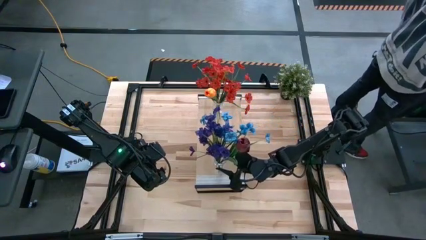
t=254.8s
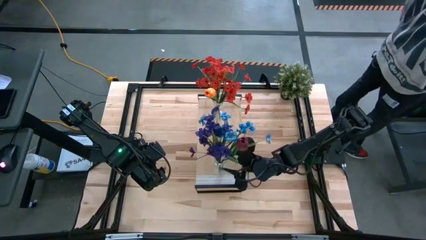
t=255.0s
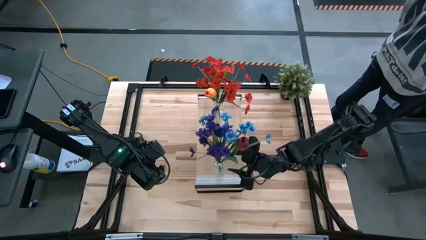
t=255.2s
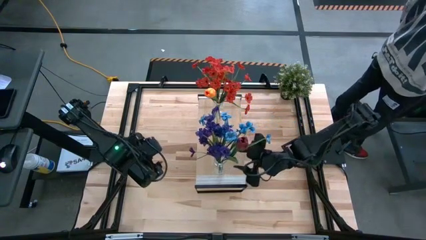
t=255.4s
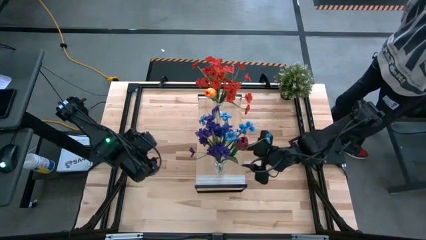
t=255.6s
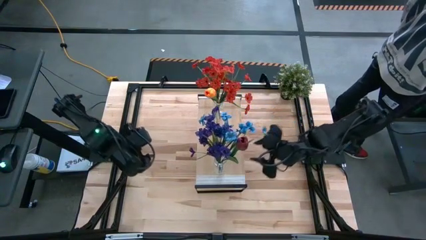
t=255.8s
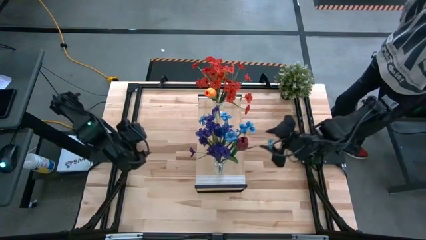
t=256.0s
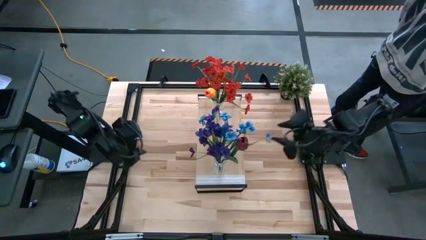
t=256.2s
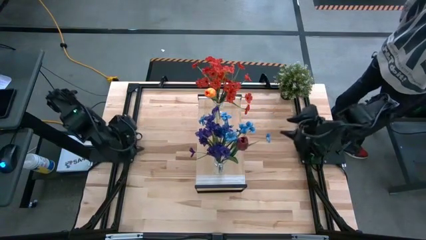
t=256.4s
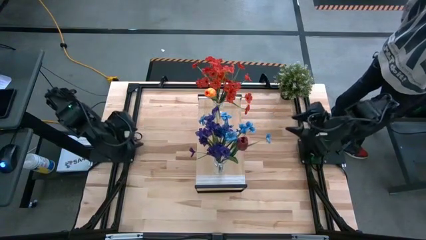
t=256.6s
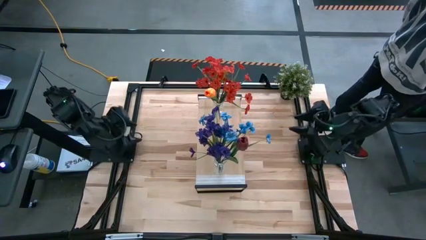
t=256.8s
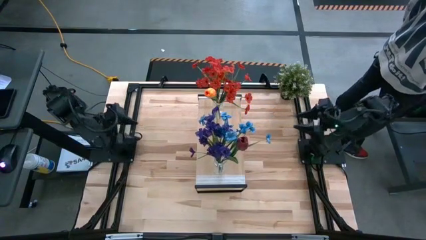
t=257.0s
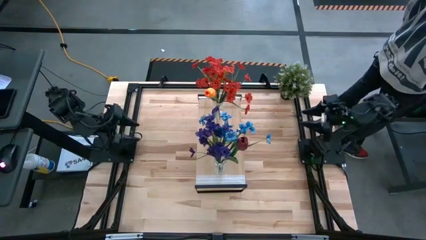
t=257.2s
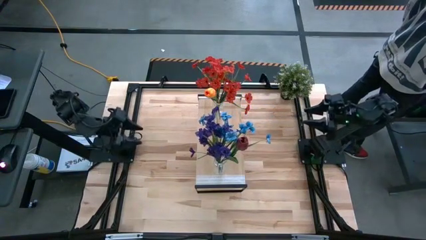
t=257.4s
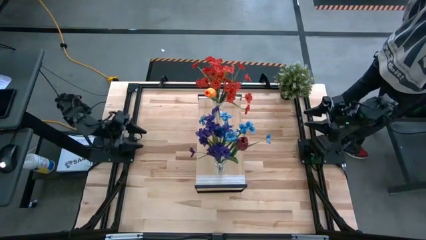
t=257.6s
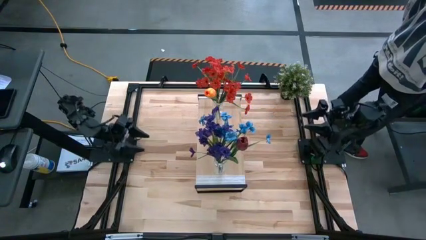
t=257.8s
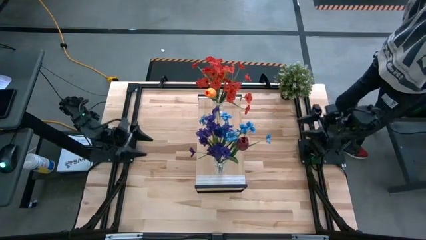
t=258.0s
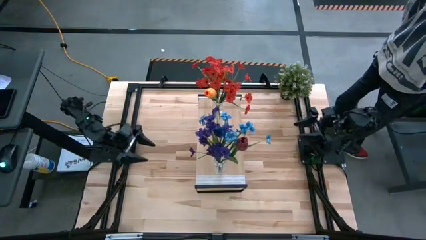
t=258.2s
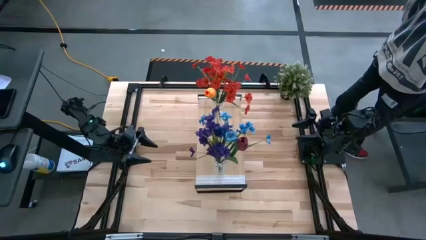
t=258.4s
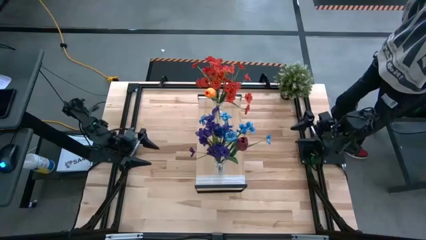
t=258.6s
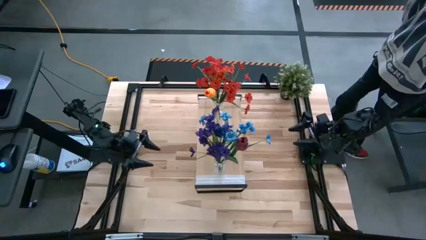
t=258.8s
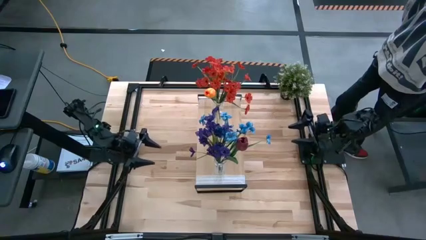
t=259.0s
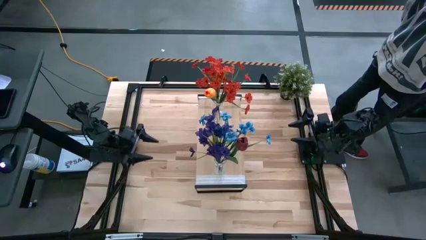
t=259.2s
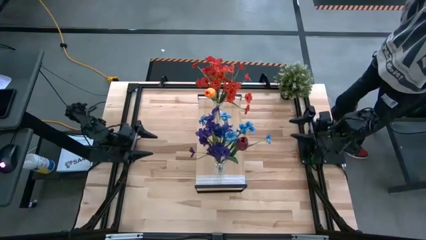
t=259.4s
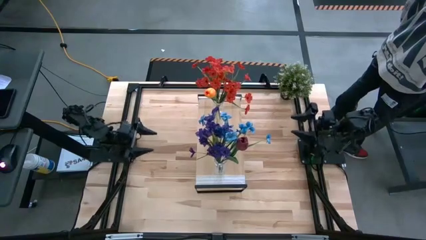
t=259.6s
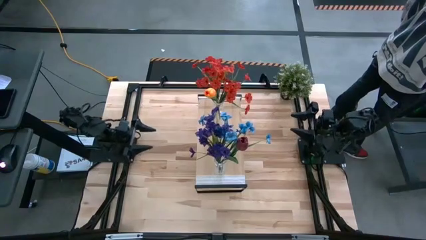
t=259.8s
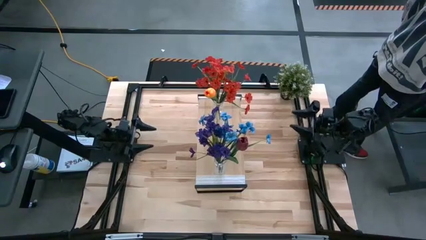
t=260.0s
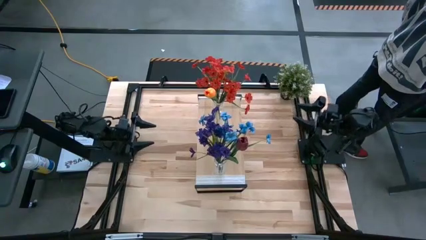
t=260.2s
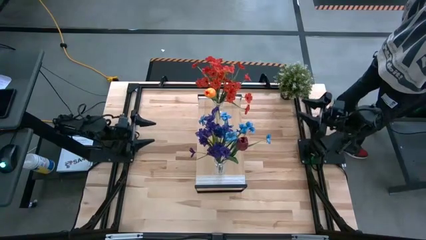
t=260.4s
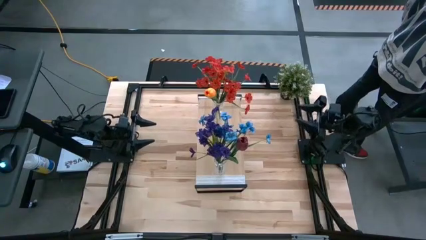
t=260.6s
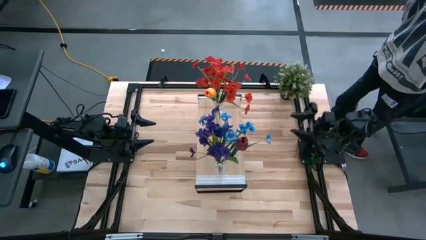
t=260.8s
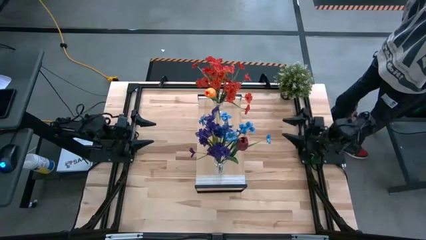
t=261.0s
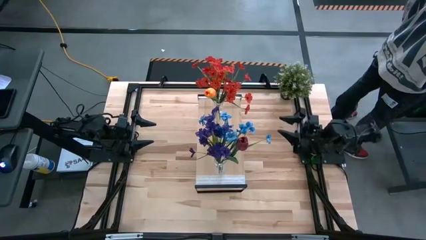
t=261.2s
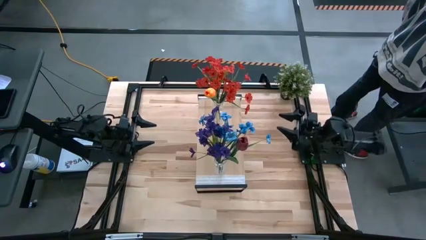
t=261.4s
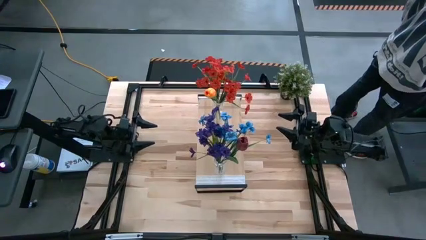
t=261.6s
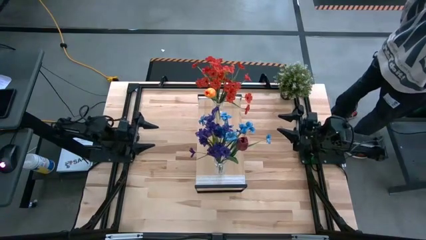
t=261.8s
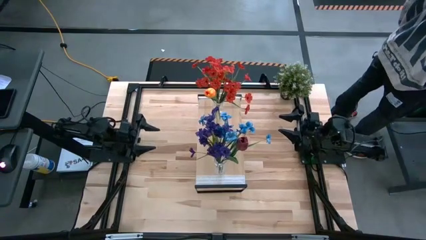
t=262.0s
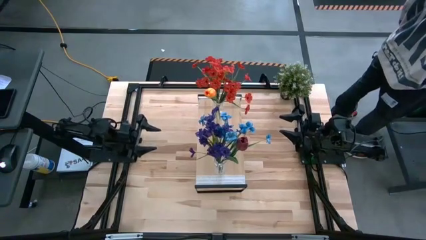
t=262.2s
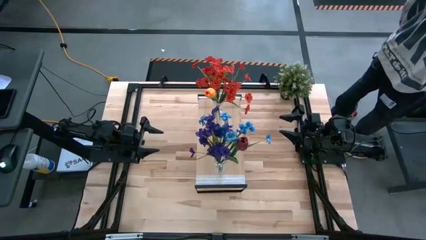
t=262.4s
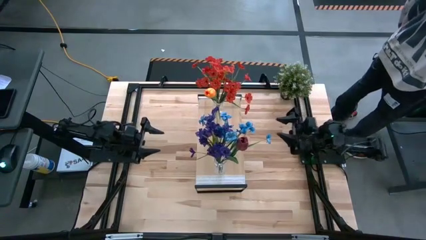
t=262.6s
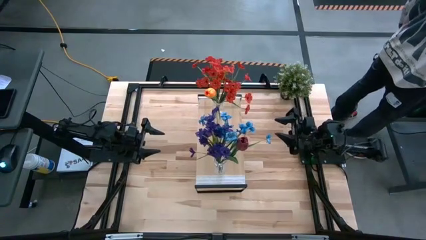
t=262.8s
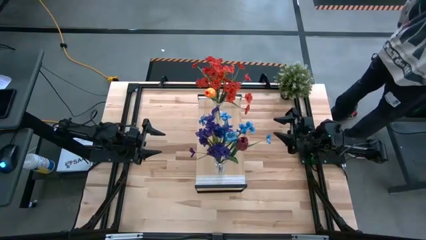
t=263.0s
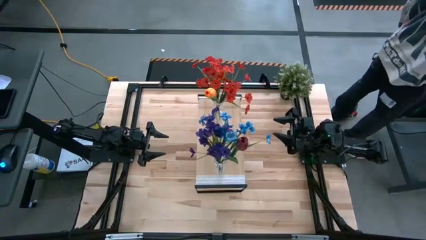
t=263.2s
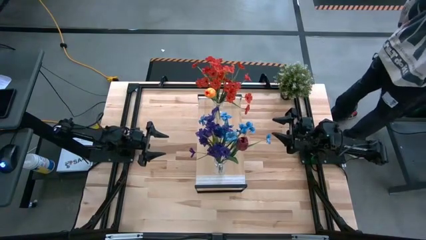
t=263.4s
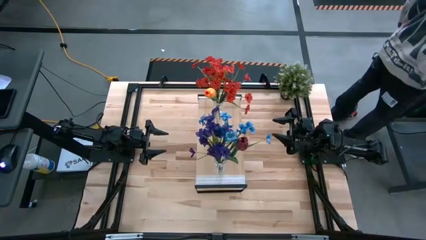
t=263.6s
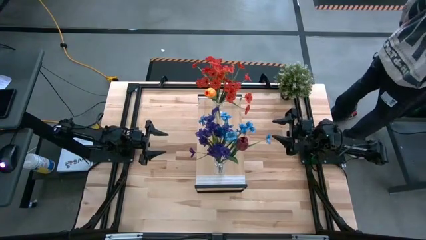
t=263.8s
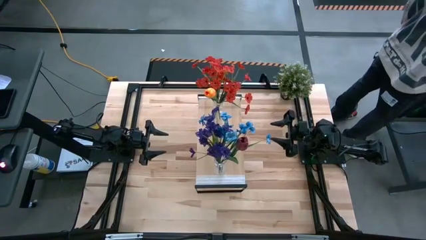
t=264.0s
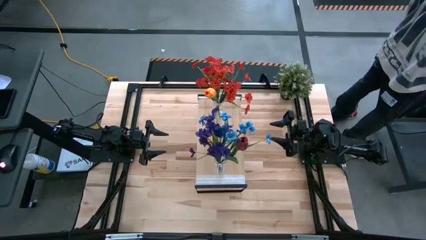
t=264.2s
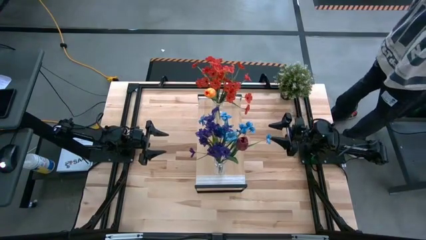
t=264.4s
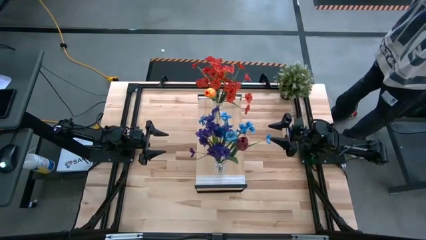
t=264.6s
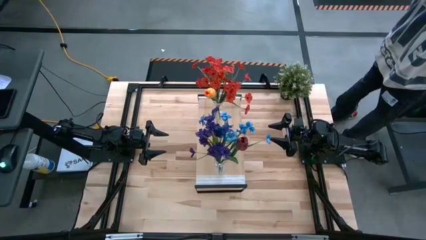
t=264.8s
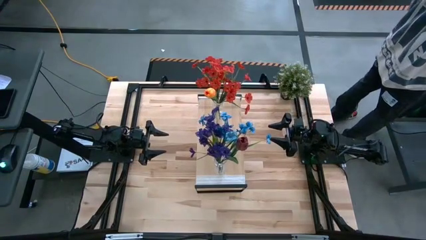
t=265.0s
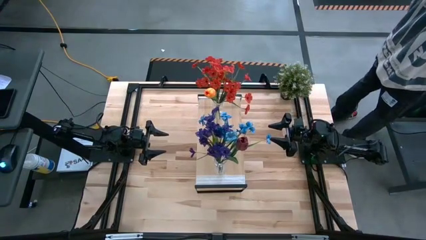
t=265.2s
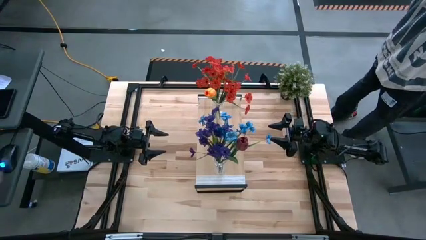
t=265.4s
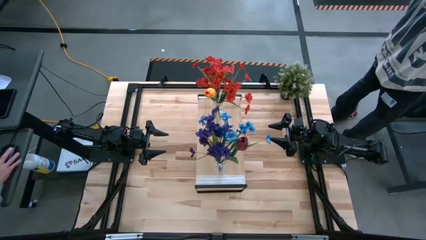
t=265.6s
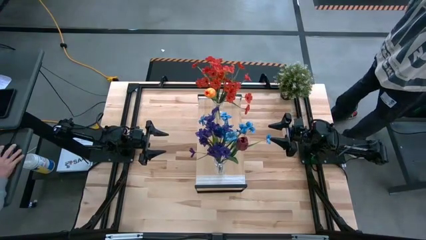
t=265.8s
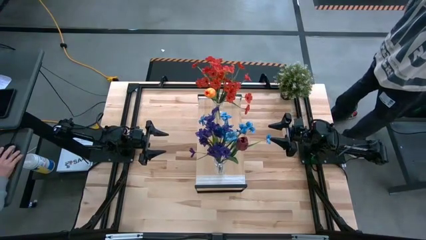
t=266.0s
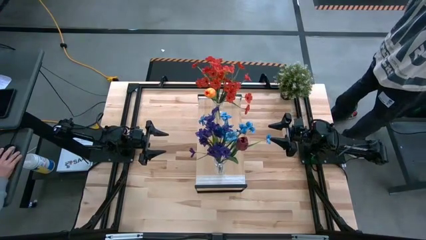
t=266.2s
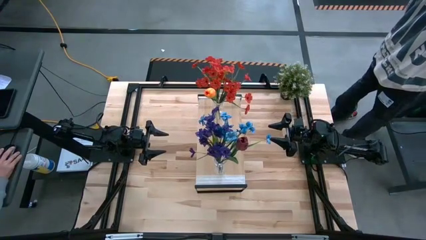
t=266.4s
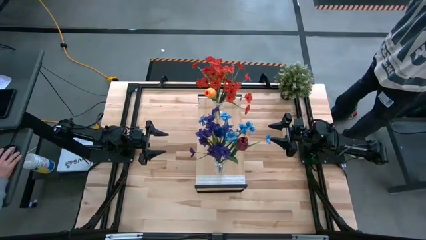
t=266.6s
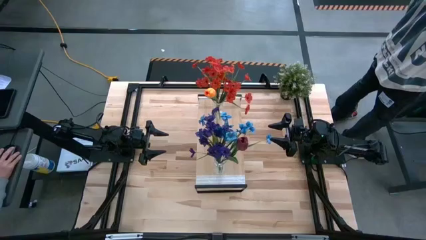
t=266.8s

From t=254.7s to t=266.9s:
Task: Pick and place flowers into a vace then onto a shelf
Return to Home Position

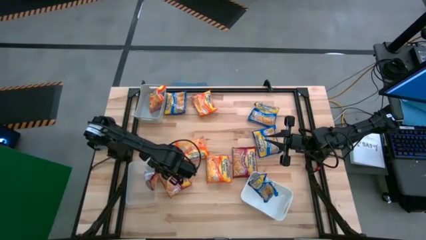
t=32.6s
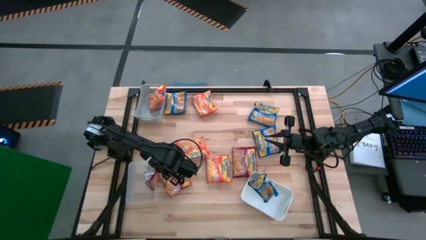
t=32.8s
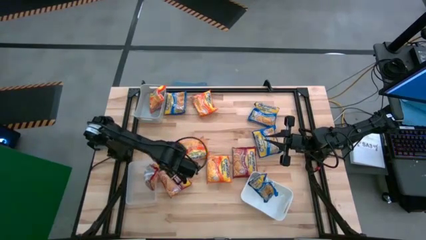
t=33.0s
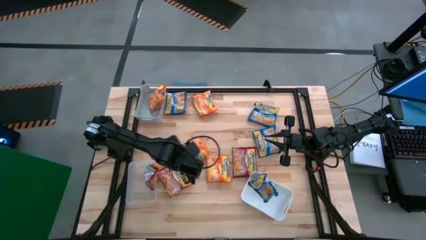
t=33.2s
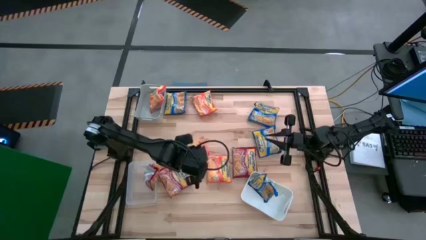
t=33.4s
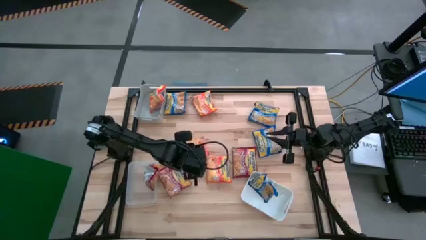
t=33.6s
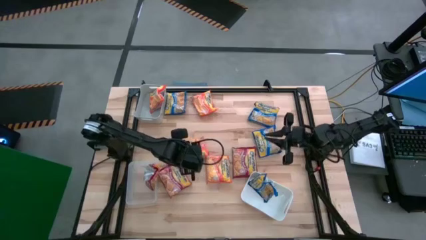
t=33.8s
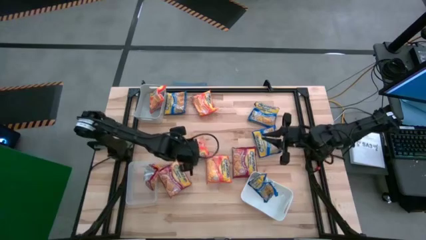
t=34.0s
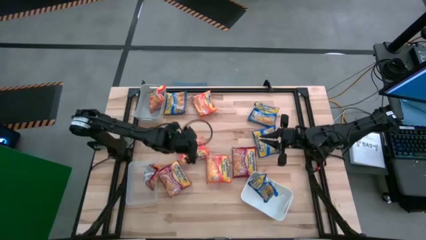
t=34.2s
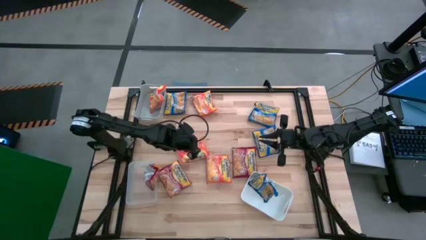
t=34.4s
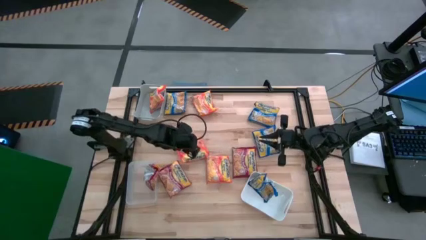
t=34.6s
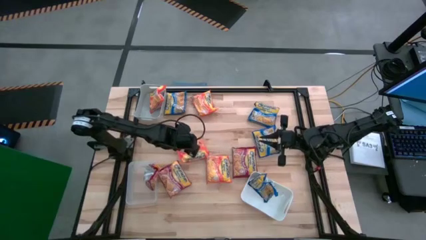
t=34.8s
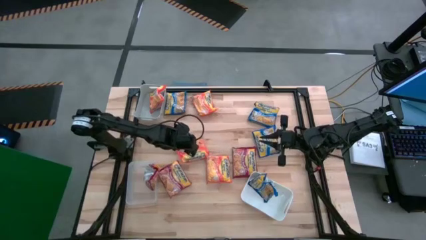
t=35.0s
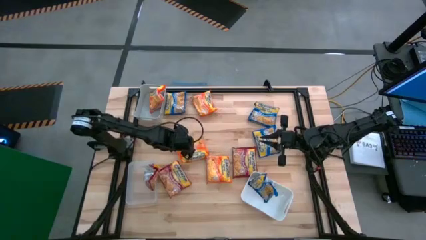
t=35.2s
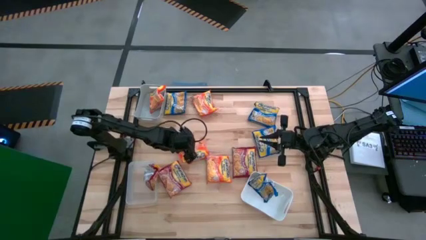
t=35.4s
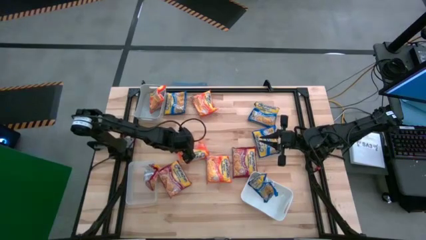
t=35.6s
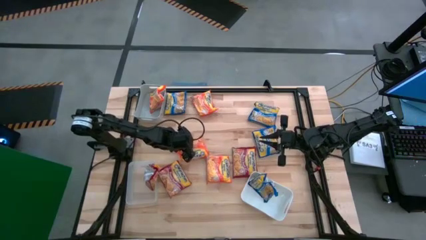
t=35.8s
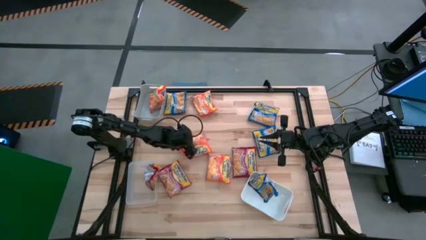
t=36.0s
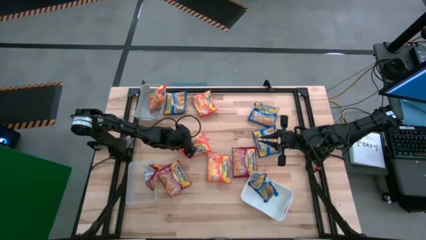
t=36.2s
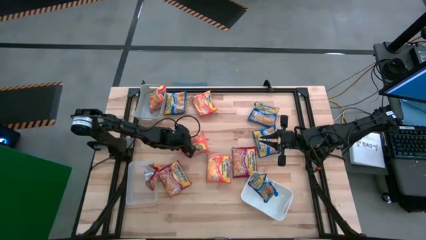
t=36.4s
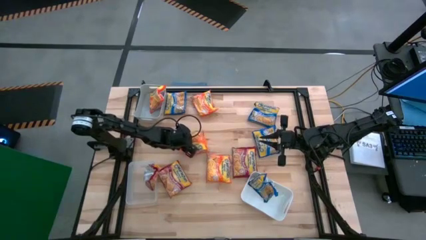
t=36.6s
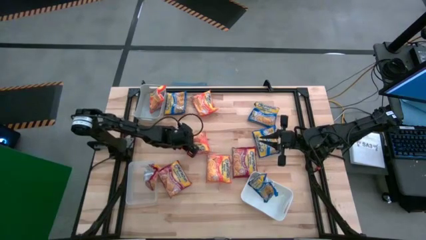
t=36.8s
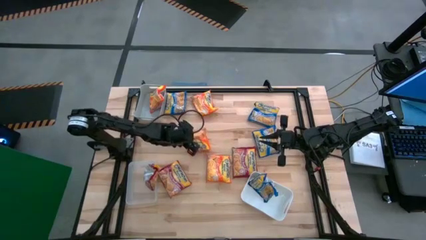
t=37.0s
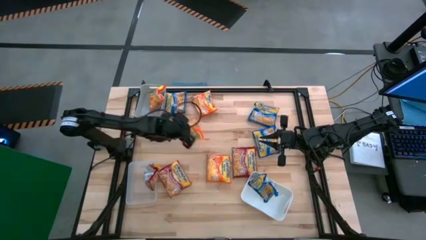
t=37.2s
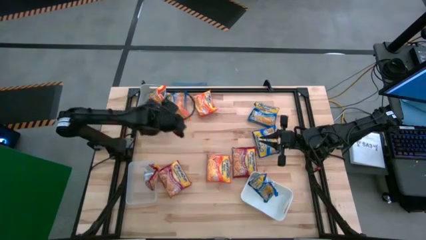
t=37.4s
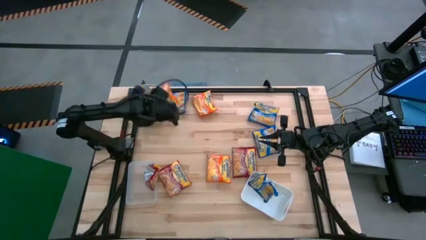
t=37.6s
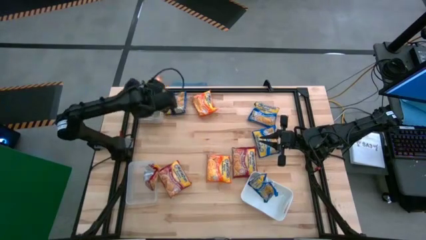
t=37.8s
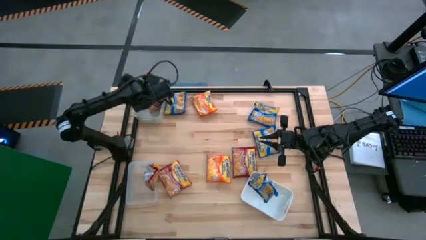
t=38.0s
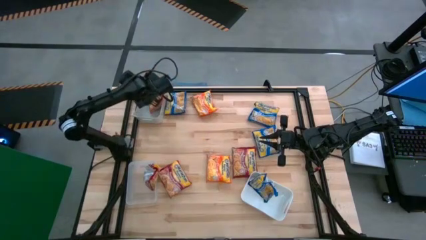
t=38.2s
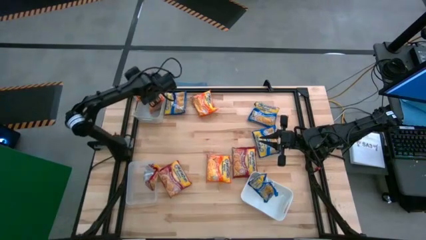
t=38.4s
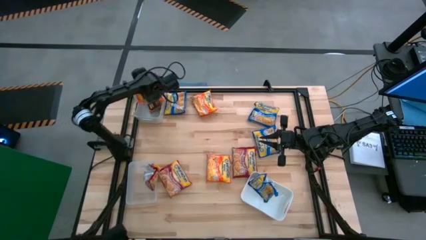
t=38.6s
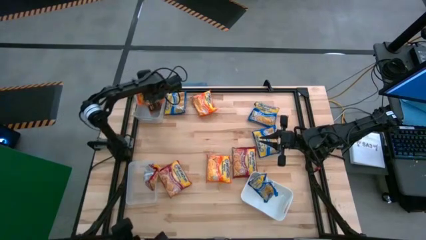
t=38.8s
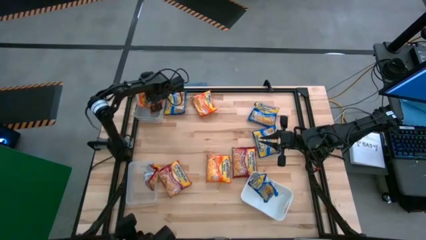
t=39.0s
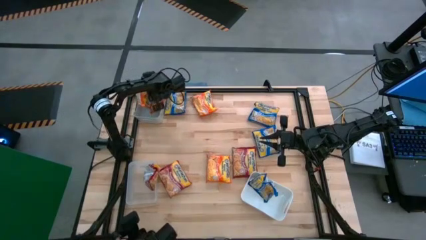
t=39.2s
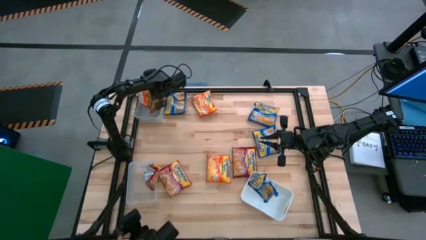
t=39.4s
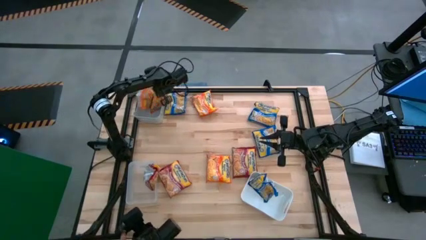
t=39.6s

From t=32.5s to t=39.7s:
Task: Sort Maruchan noodles
Put the orange noodle pack into the gray bin
